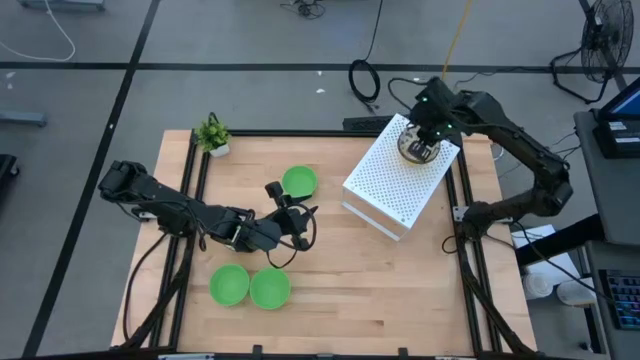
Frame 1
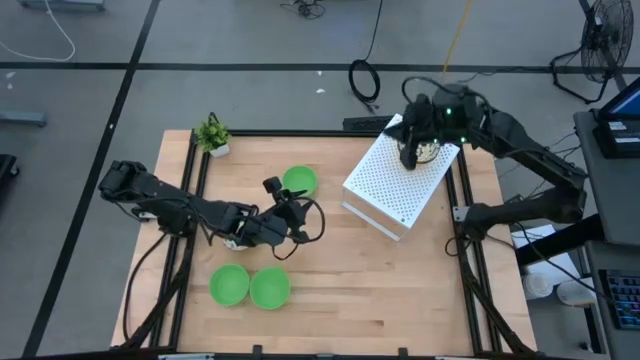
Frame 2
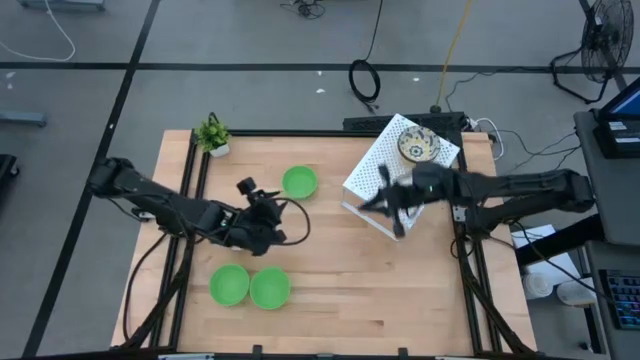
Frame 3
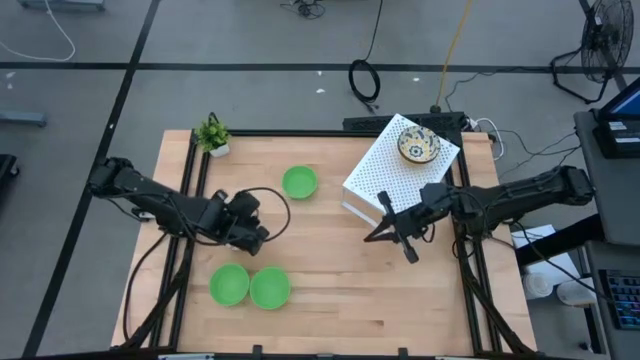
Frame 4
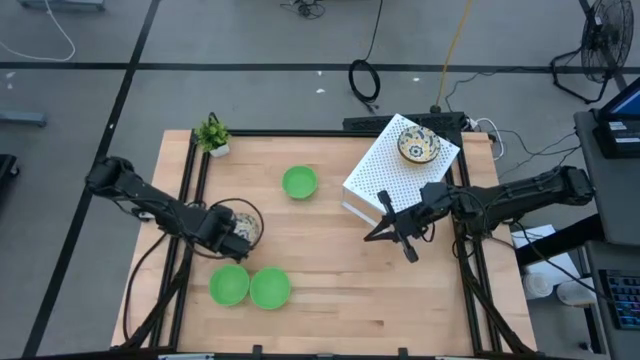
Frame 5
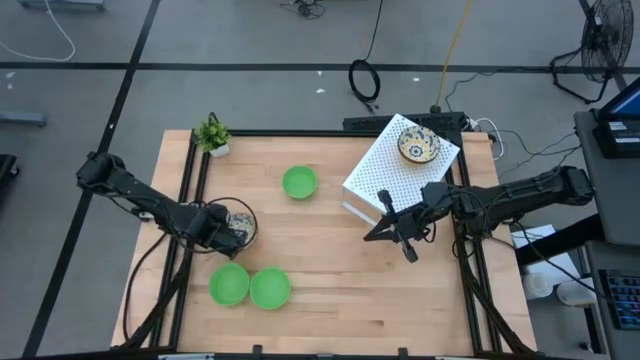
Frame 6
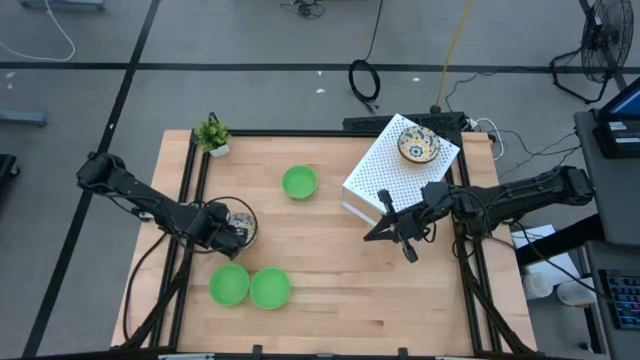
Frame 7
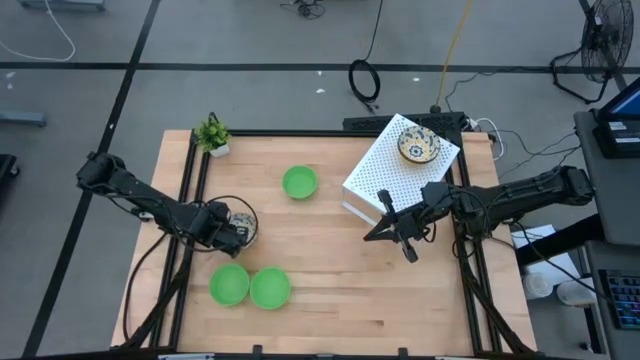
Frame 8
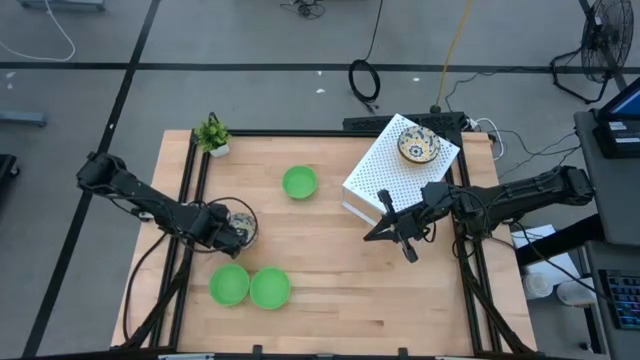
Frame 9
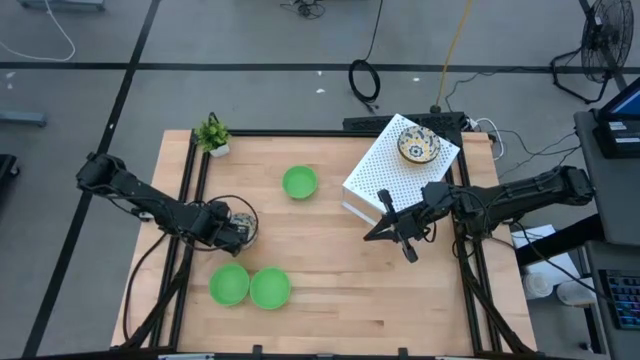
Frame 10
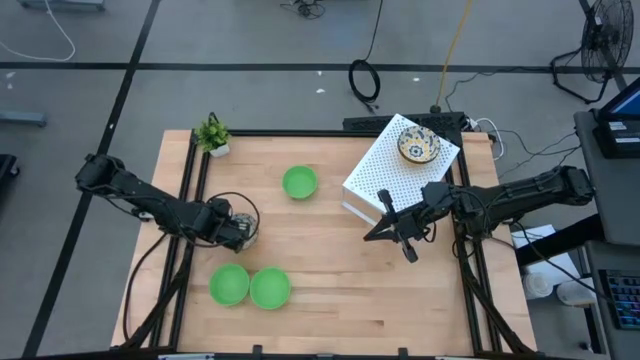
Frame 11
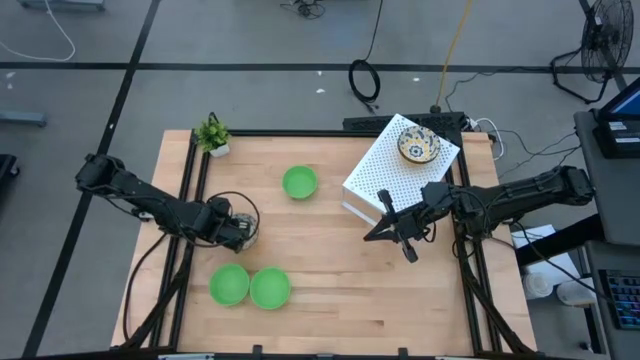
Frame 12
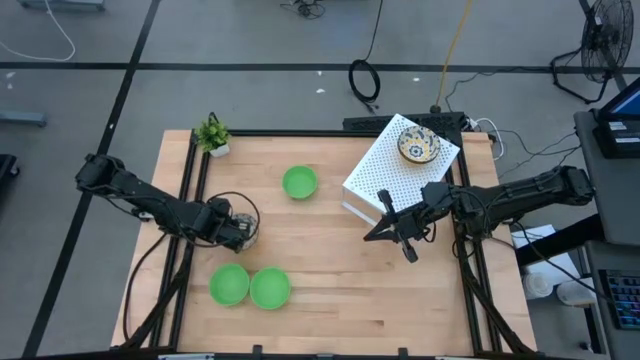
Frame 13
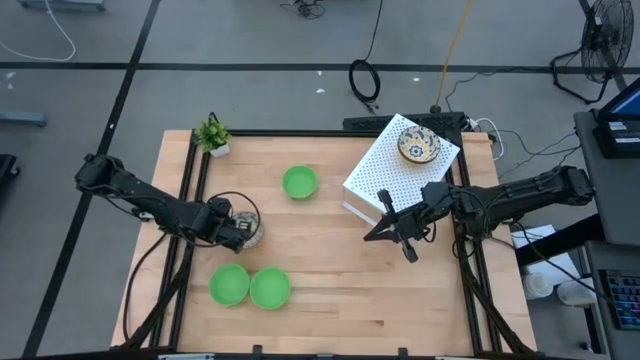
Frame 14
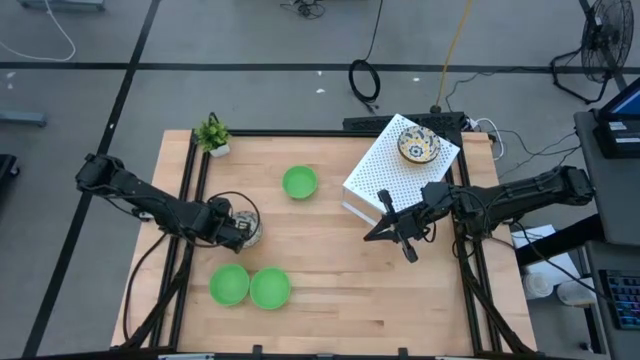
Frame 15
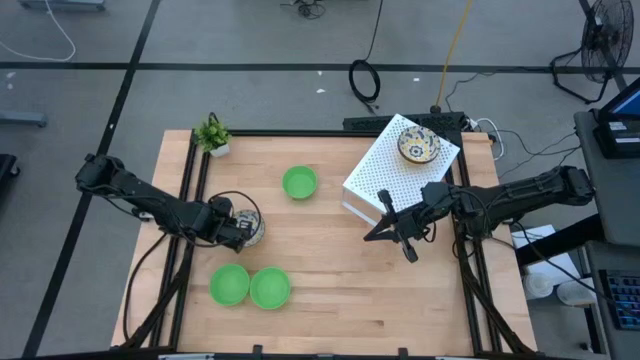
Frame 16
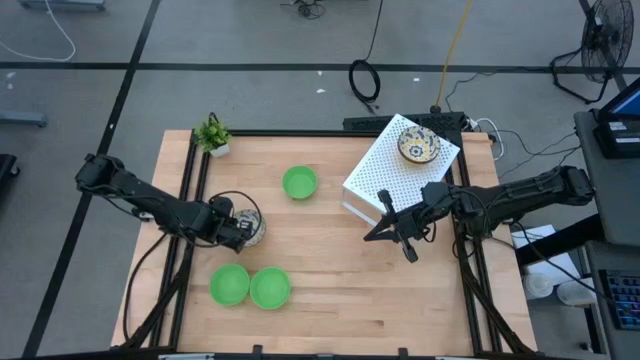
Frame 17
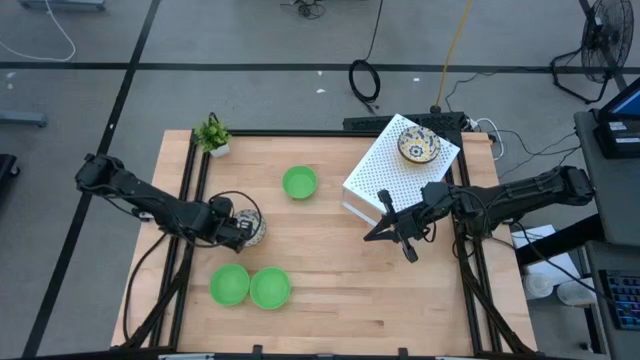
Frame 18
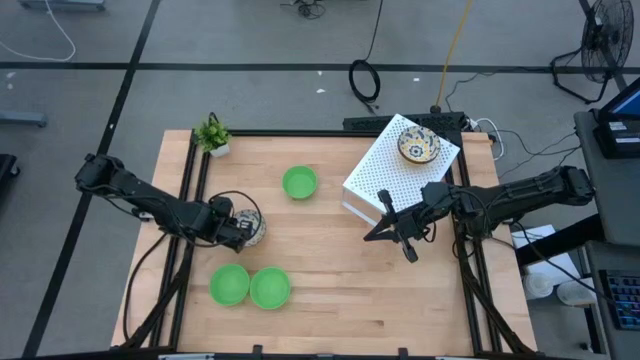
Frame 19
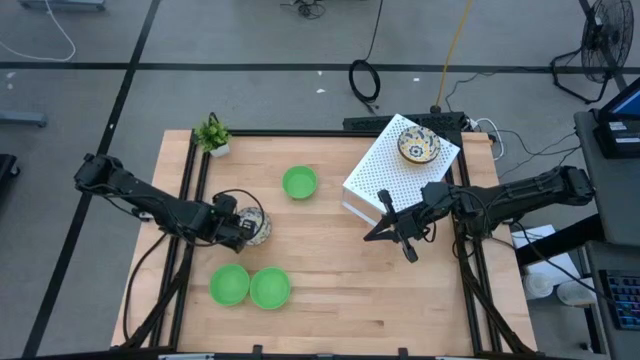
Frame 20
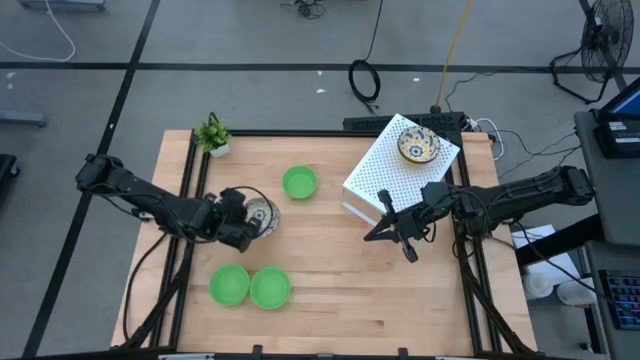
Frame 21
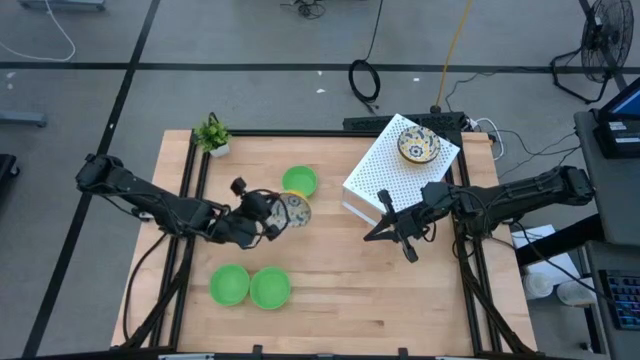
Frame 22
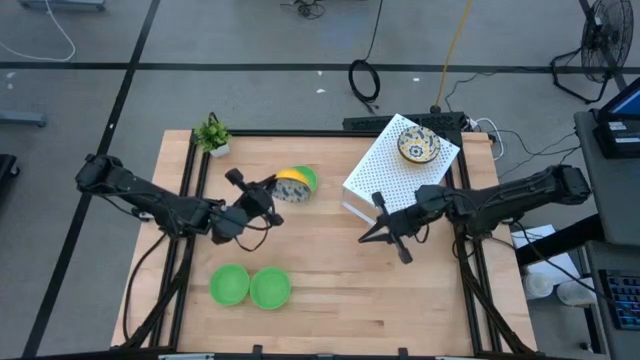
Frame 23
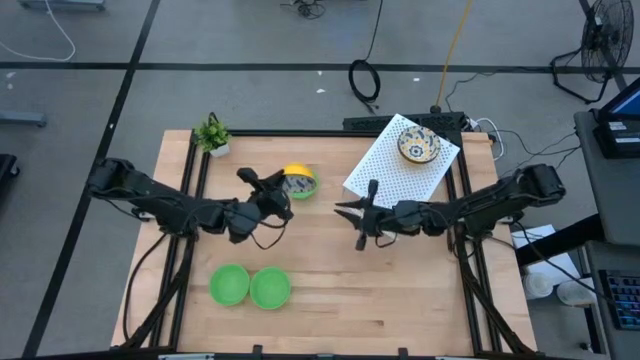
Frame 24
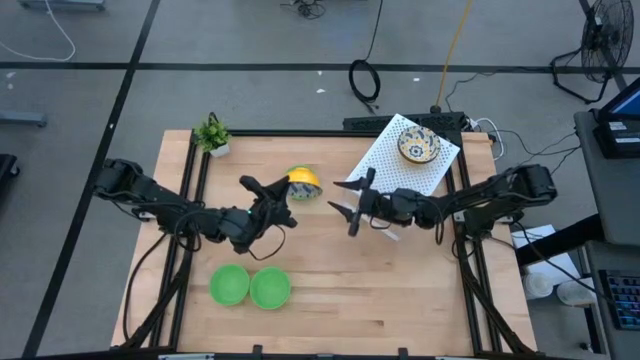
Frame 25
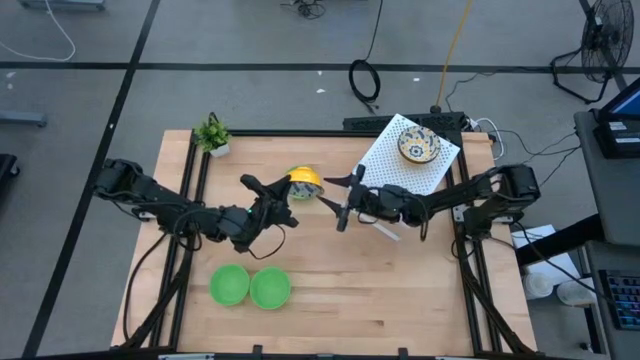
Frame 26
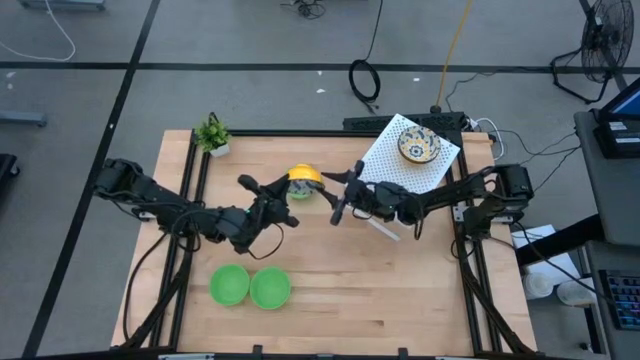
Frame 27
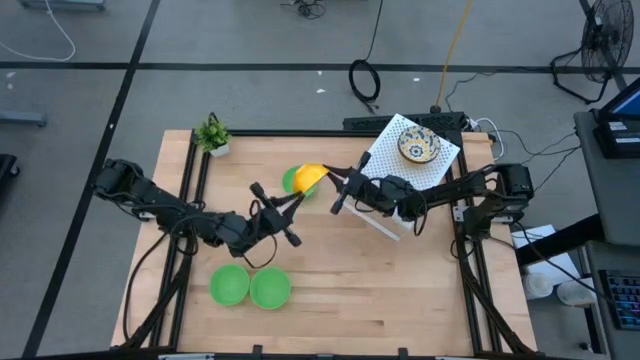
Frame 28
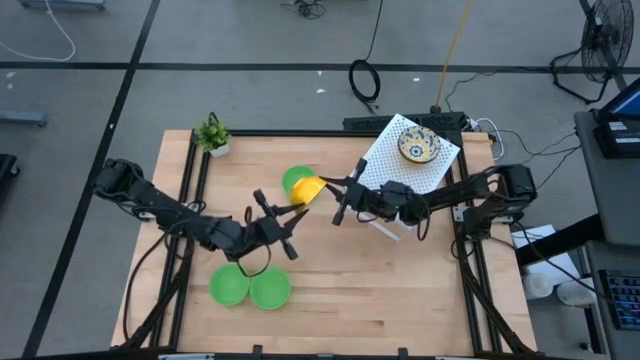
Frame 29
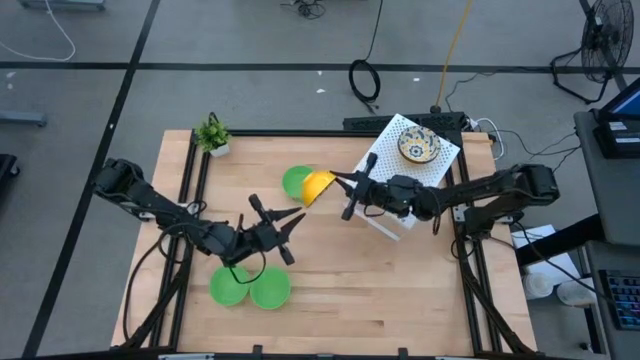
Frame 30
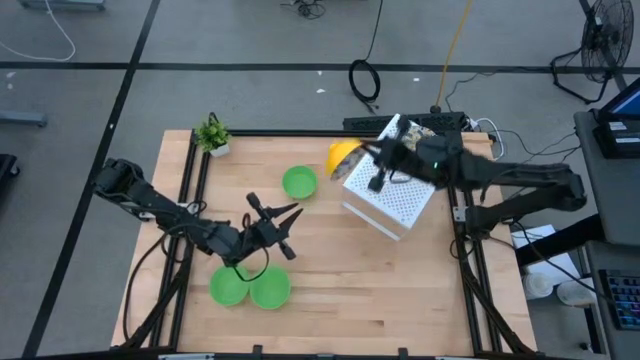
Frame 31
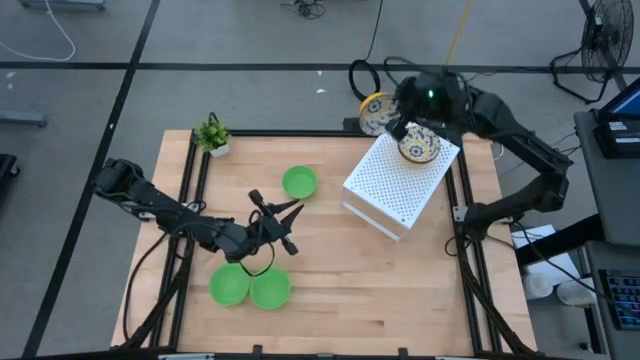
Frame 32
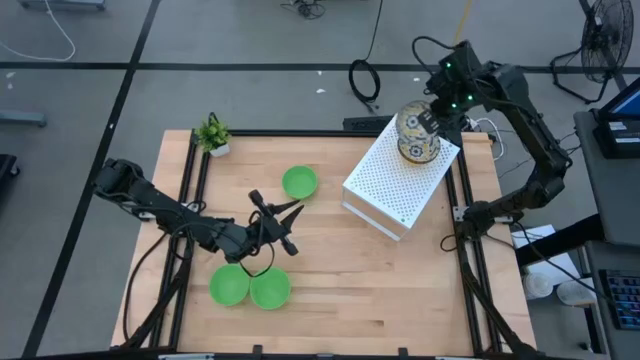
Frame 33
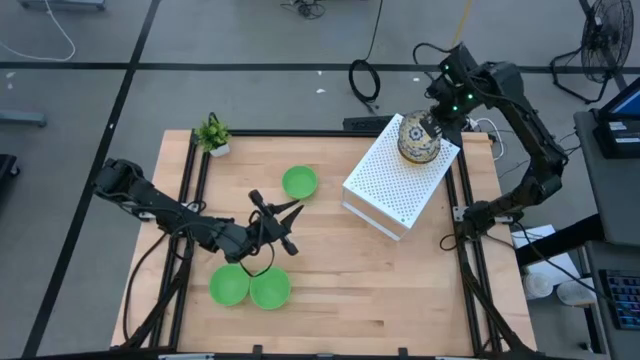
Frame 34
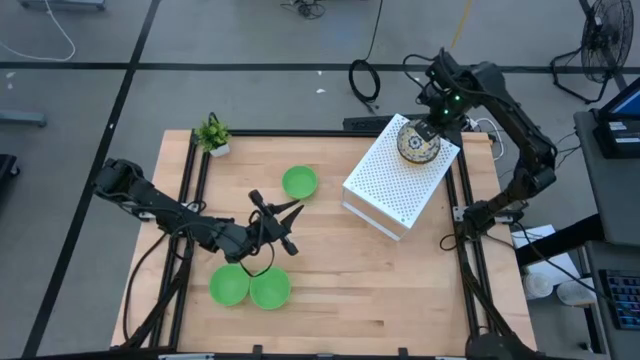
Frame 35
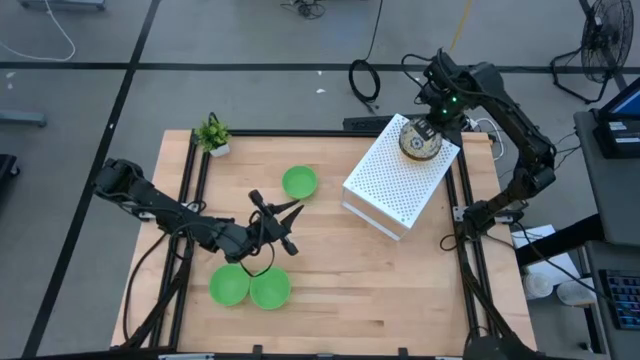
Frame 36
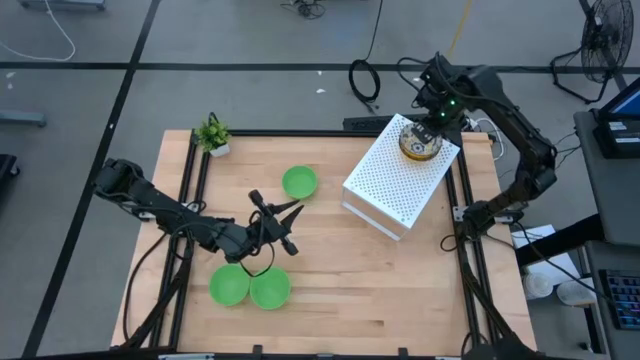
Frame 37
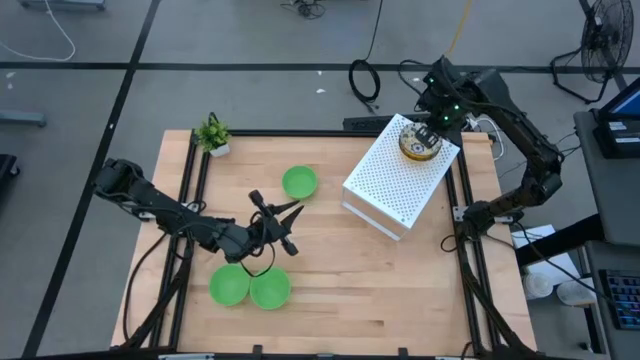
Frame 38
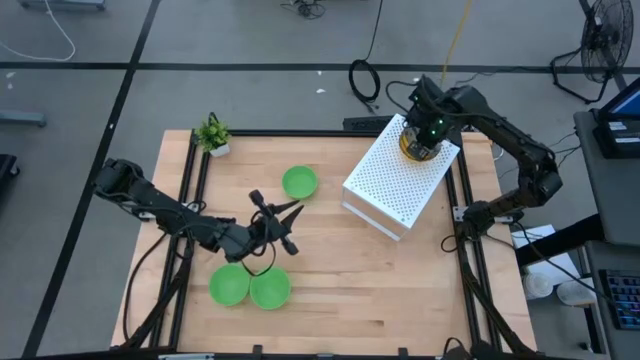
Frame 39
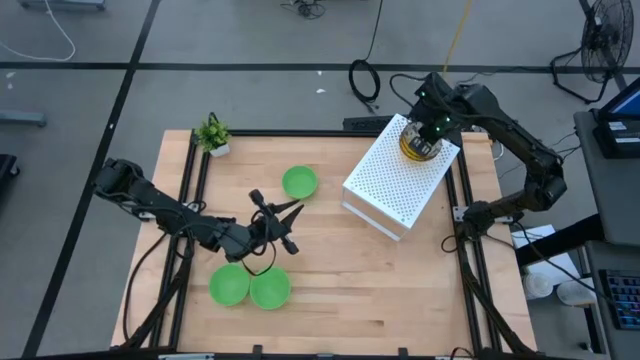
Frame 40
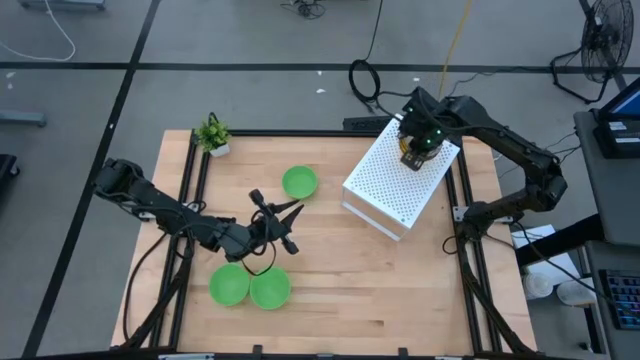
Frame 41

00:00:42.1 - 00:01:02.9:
Task: Pick & Place Mini bowls
Stack the right yellow patterned bowl on top of the other yellow patterned bowls on the shelf
